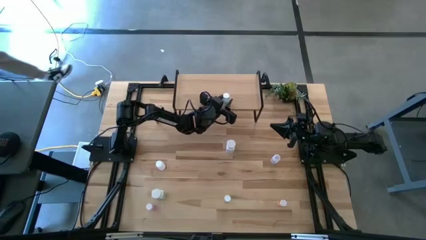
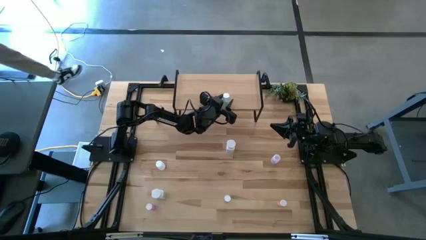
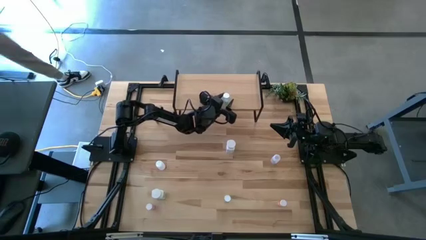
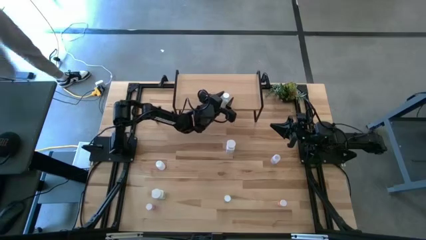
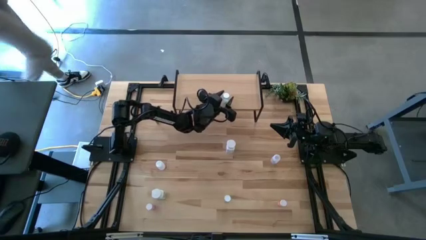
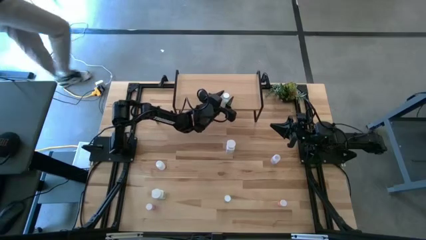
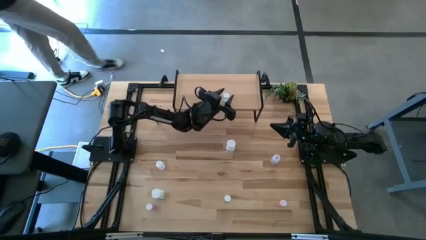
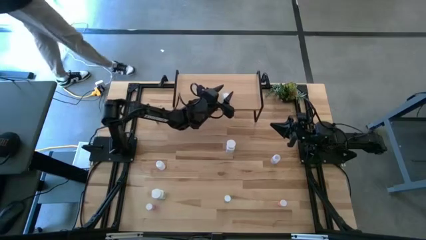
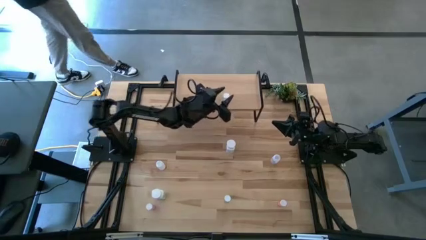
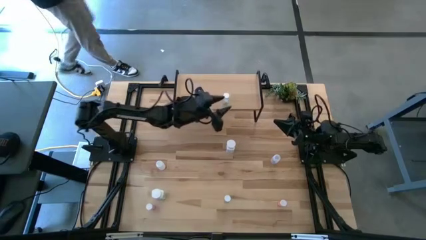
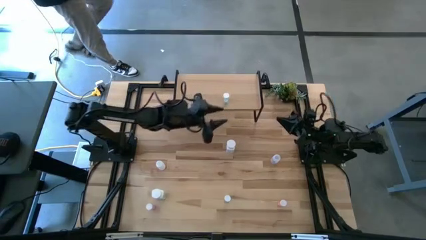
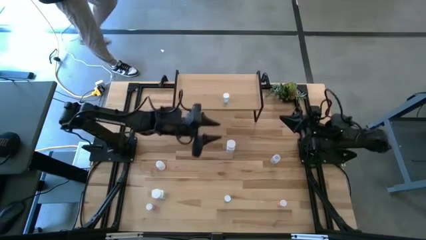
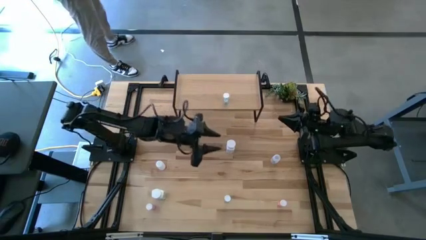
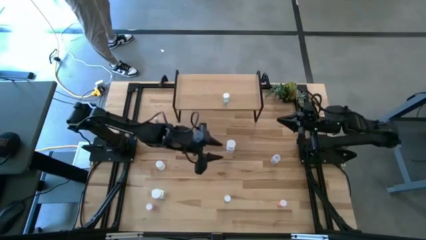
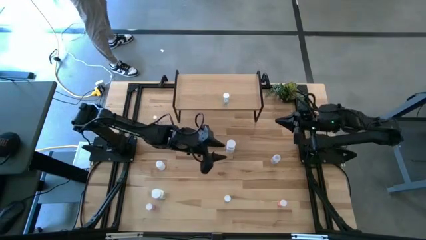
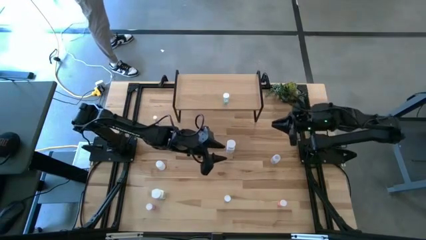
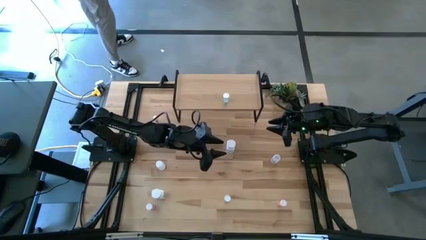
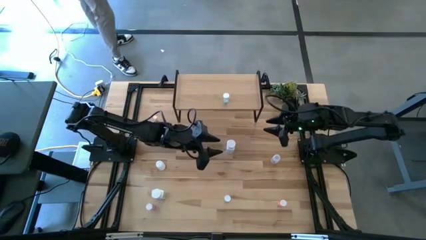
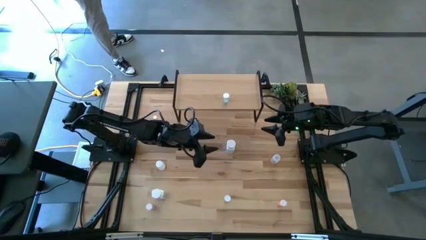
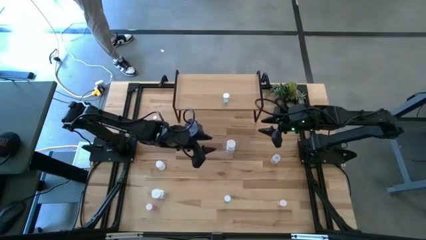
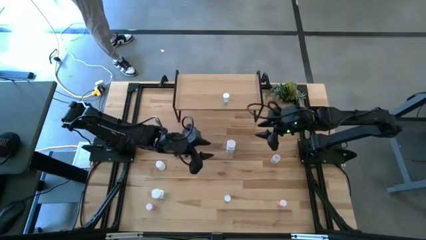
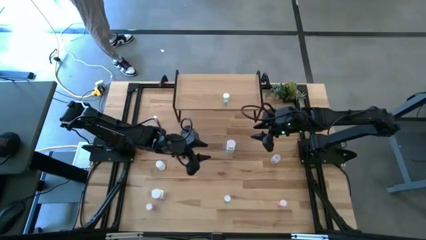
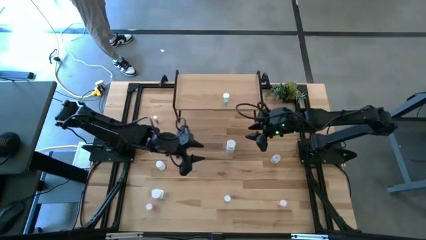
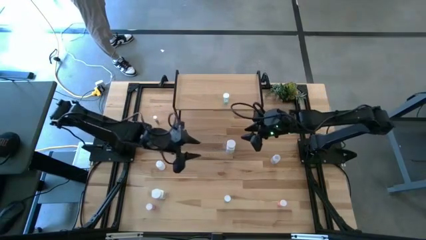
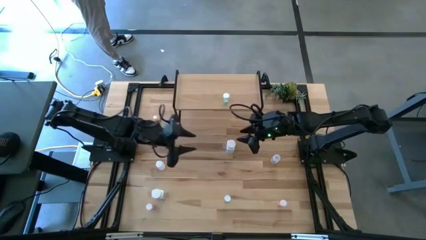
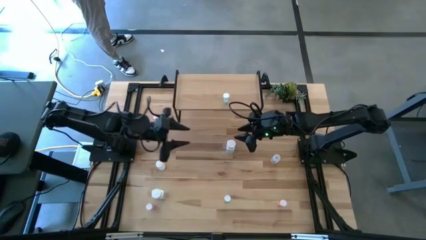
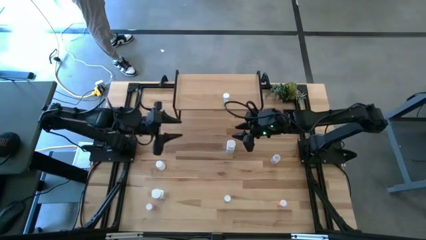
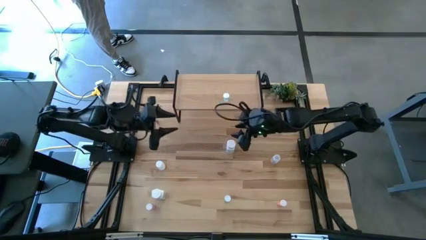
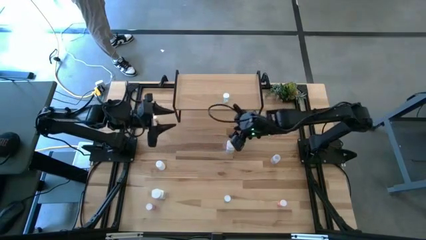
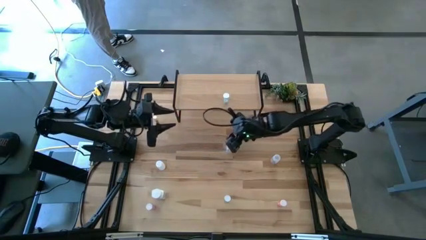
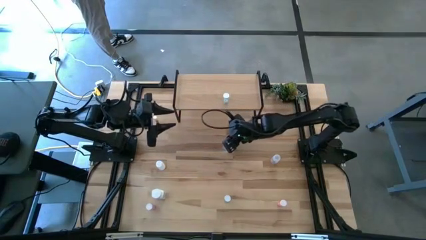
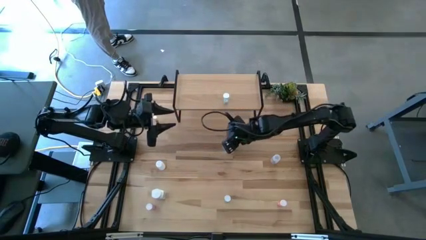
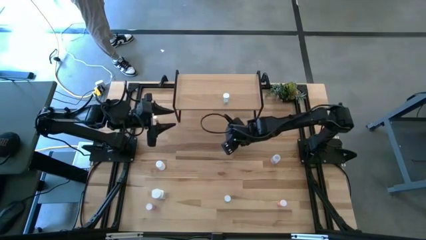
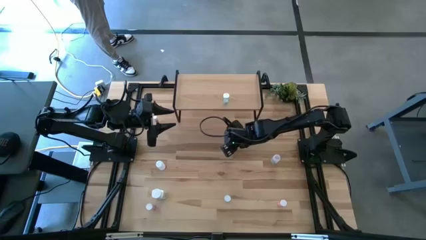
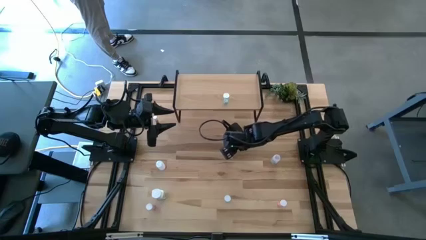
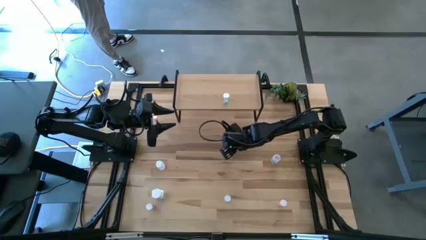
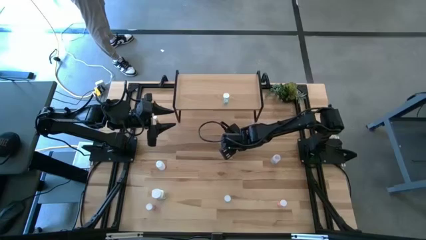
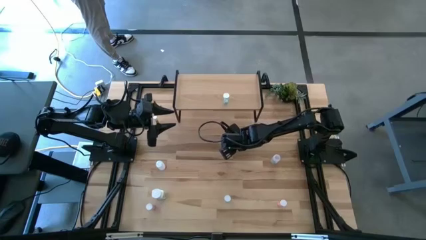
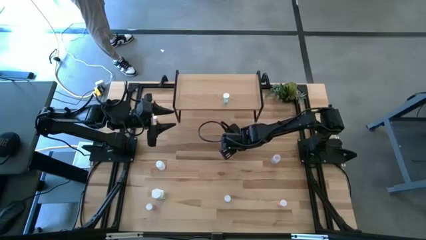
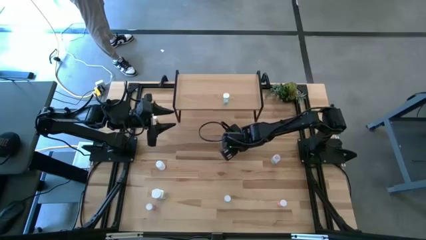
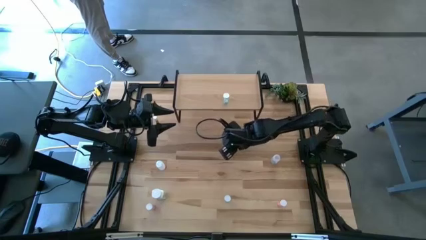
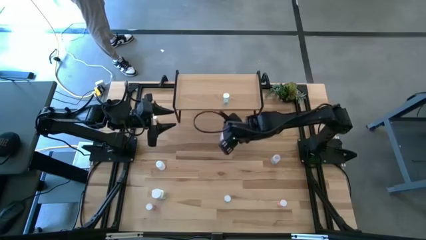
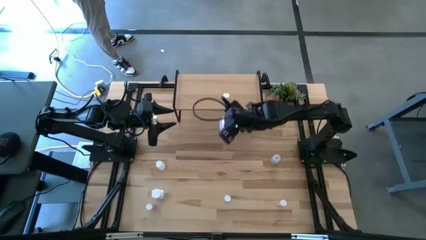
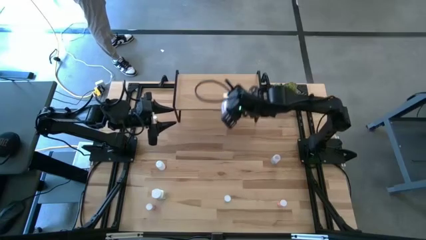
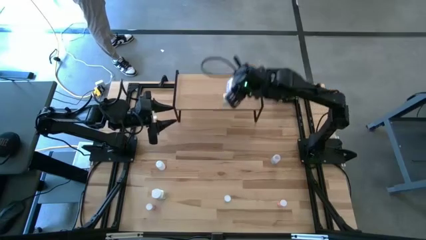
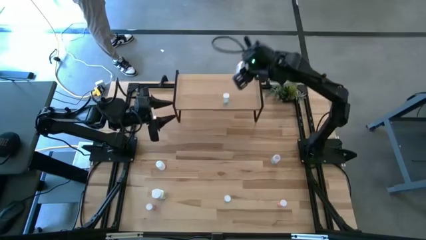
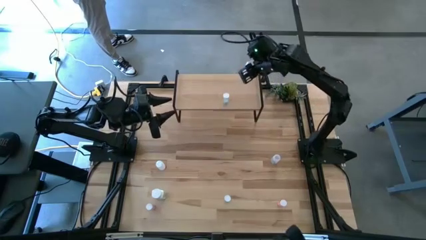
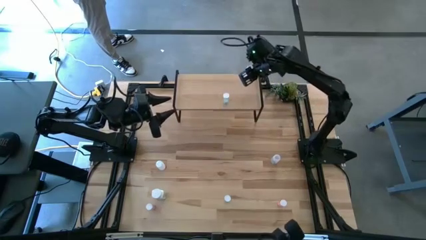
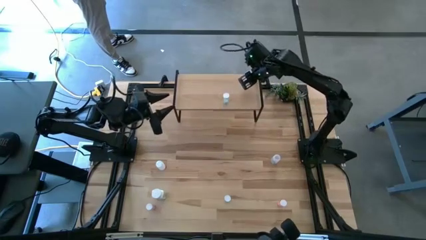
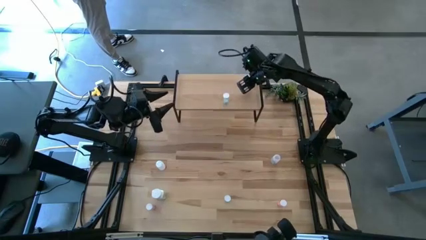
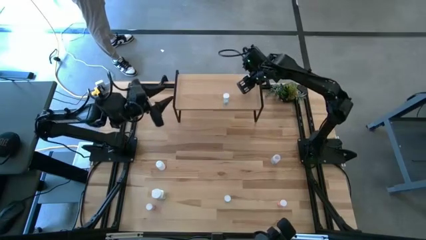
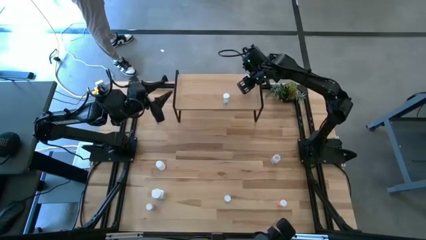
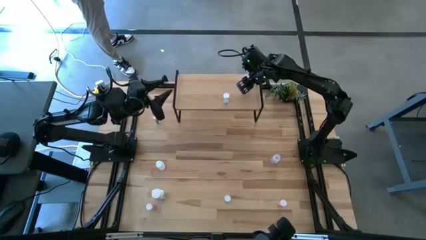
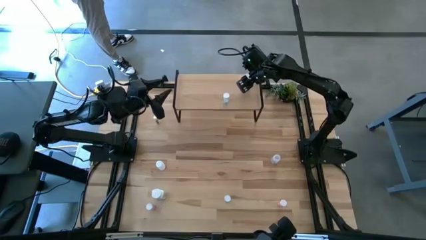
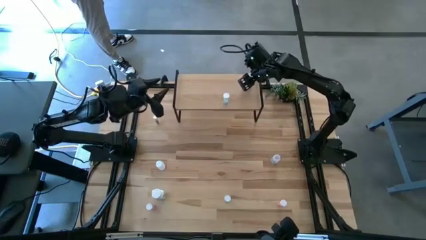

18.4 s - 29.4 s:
Task: Pick and place medicine bottles onto shelf by color
Put the top pill bottle on the shelf
